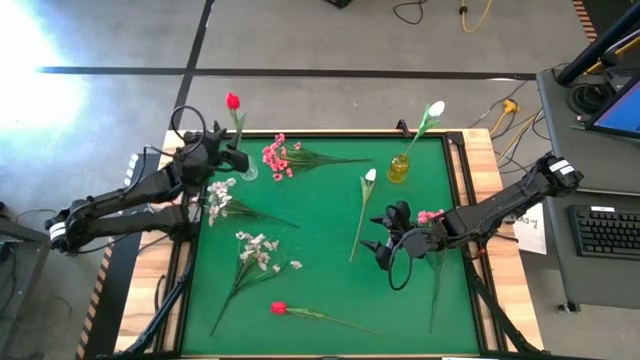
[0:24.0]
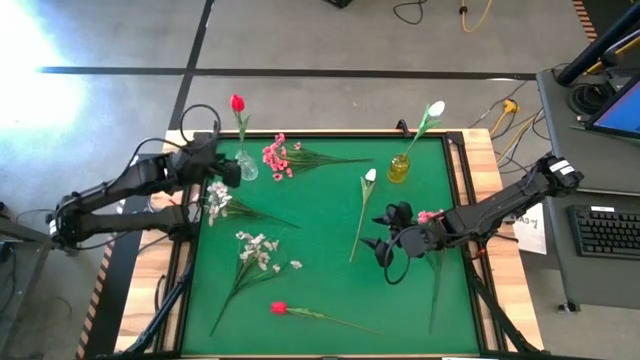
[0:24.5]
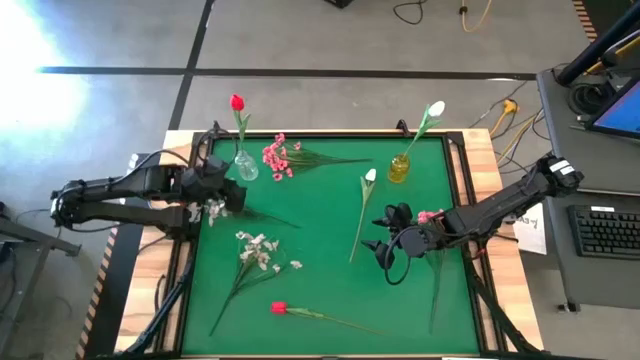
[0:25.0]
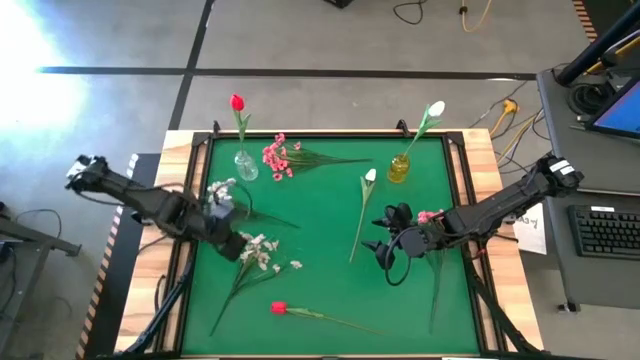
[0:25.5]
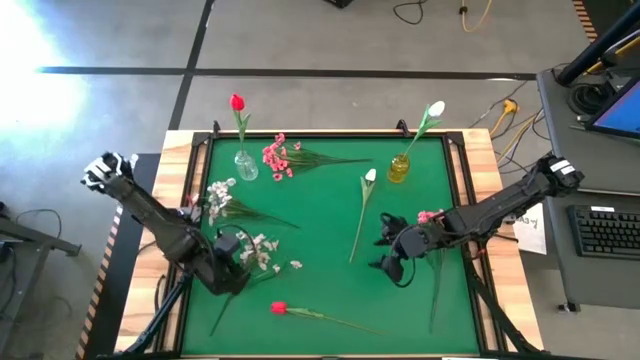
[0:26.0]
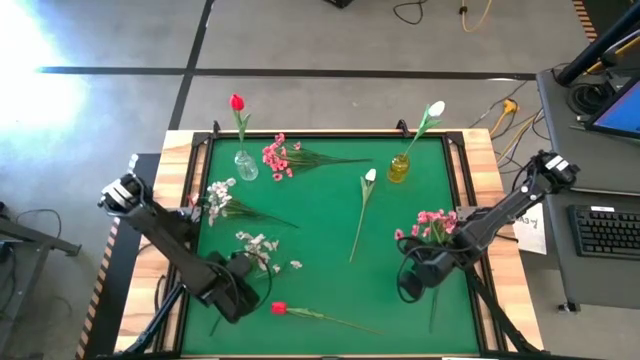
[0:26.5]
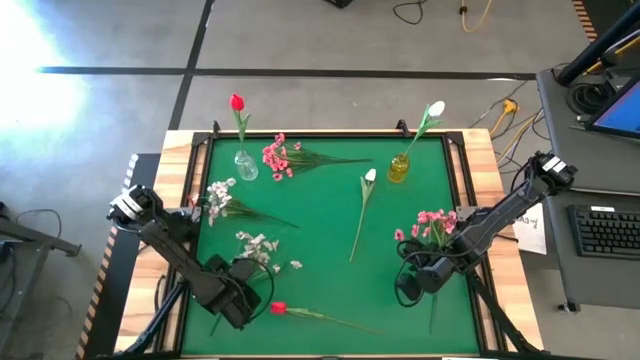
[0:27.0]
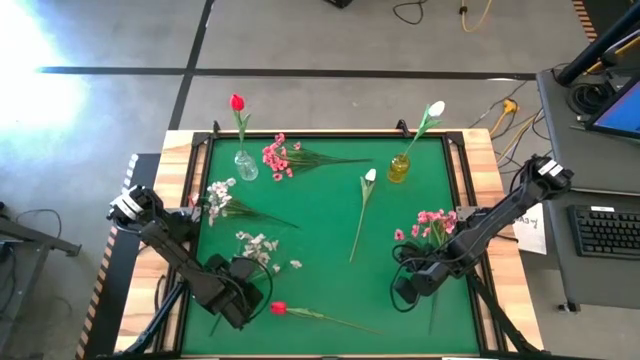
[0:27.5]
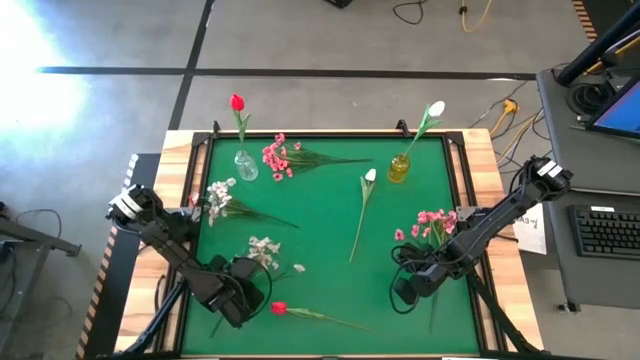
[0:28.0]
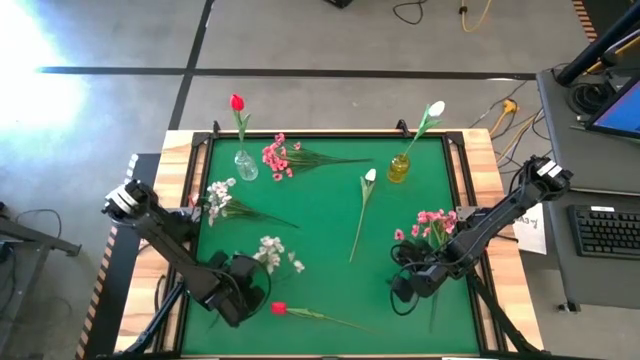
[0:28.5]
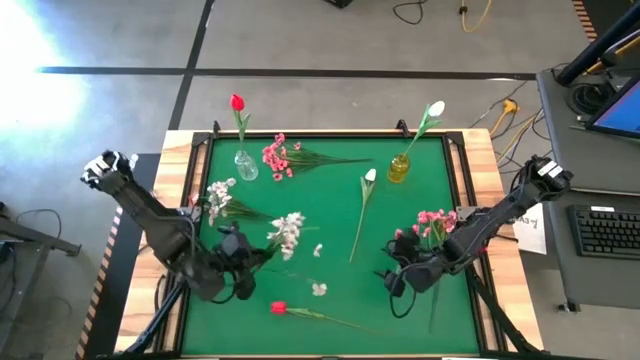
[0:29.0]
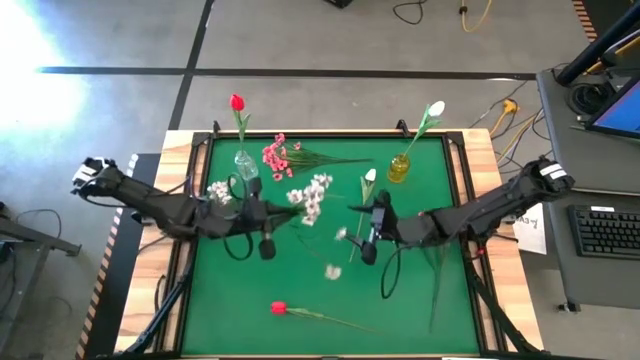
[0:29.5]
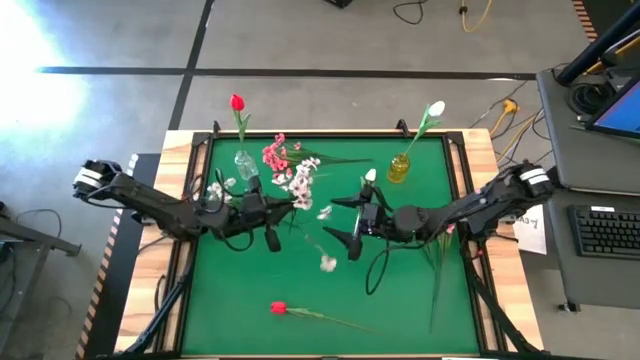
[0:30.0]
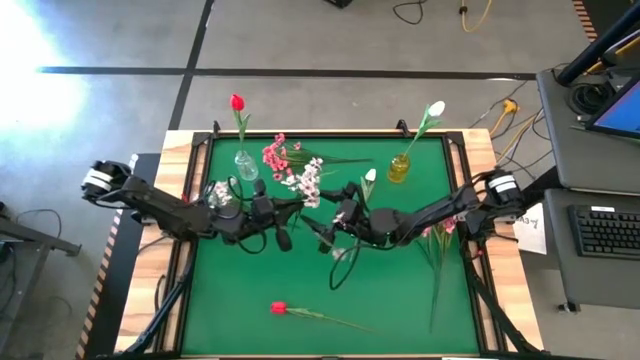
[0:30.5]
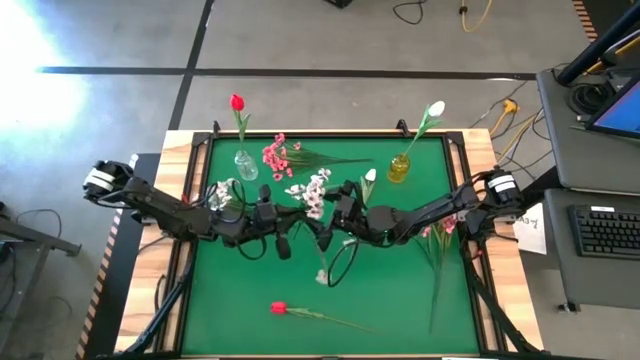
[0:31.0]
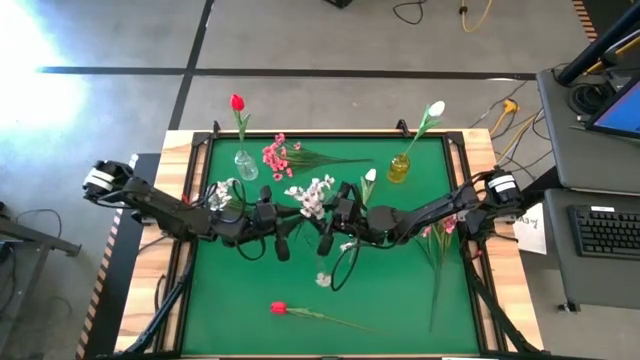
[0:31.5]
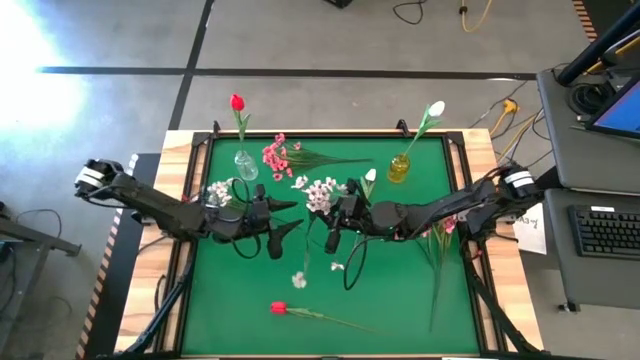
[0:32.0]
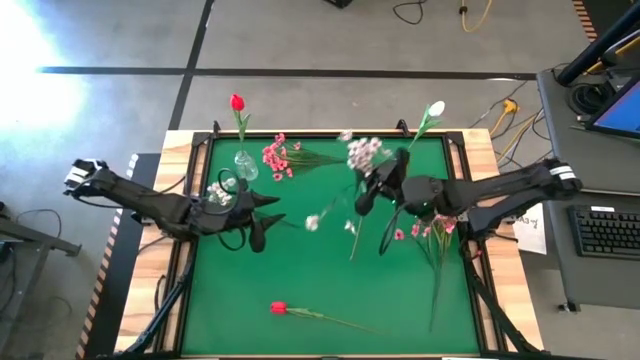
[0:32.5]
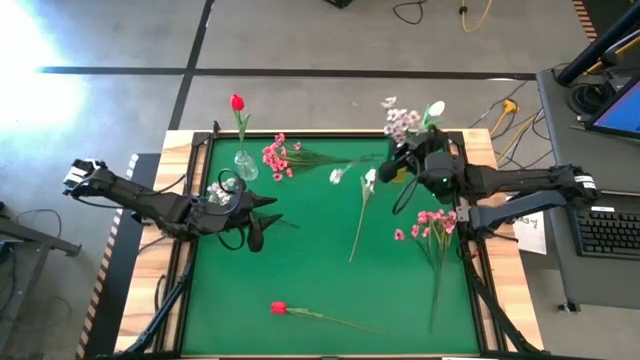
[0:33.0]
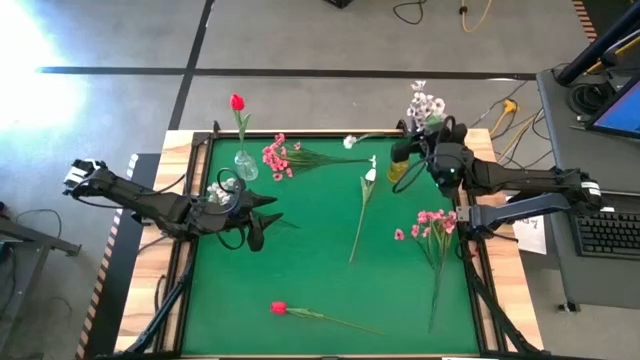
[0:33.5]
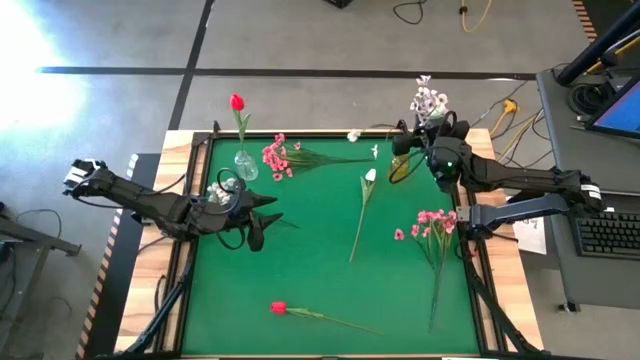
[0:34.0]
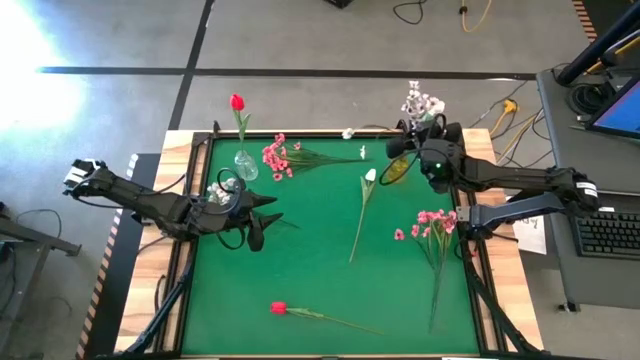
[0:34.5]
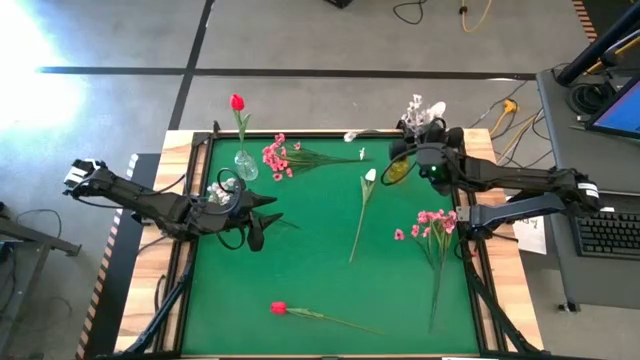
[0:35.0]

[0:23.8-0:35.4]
Task: Sort flowers into vase by color
Put the bottom white flowers into the yellow vase

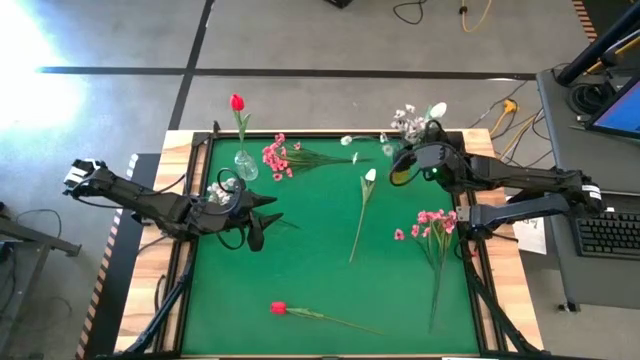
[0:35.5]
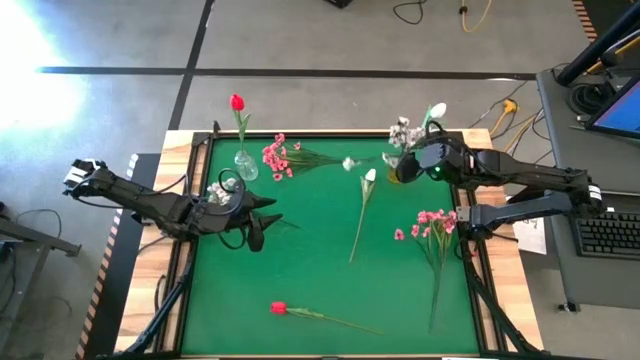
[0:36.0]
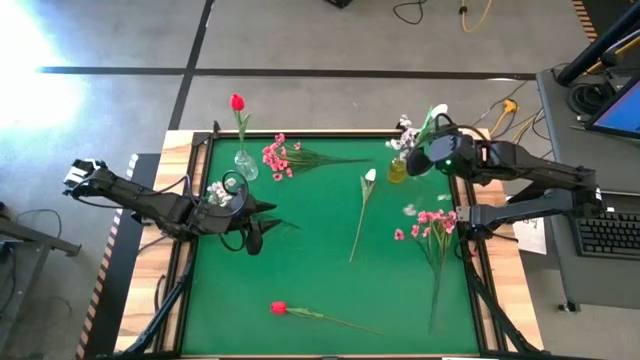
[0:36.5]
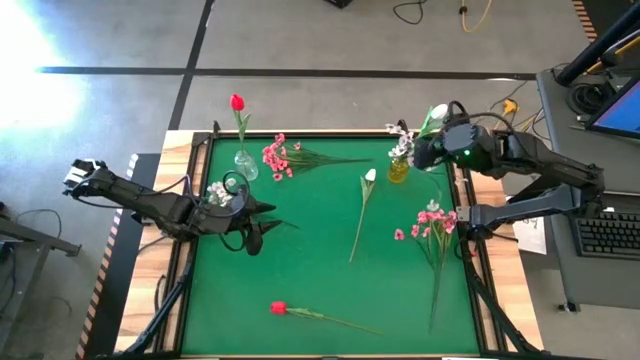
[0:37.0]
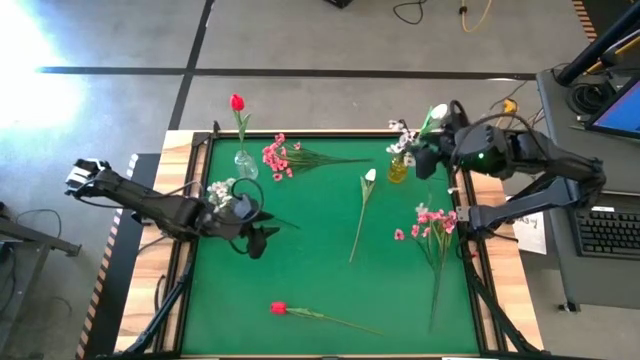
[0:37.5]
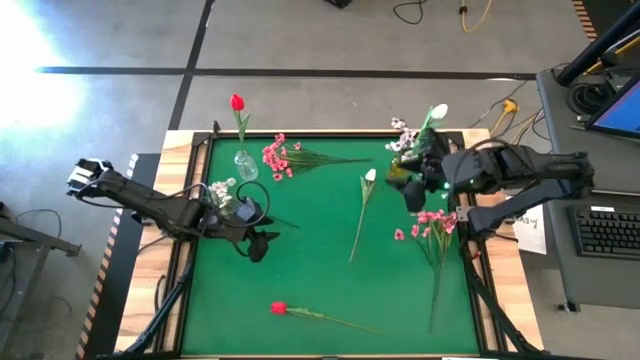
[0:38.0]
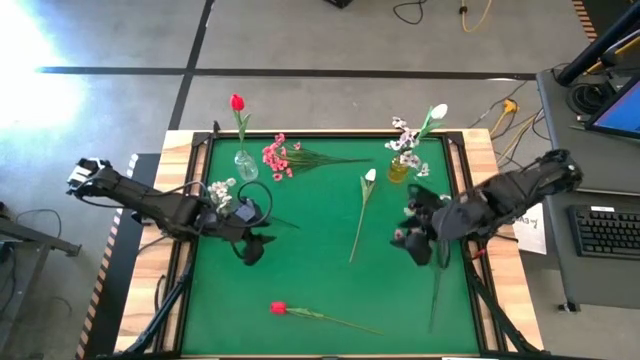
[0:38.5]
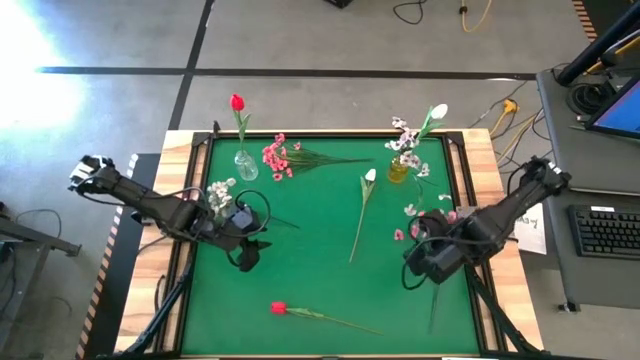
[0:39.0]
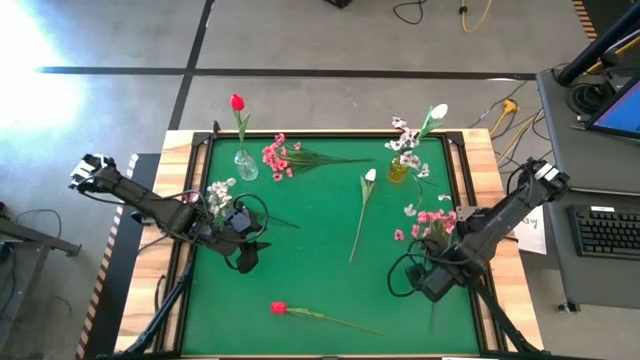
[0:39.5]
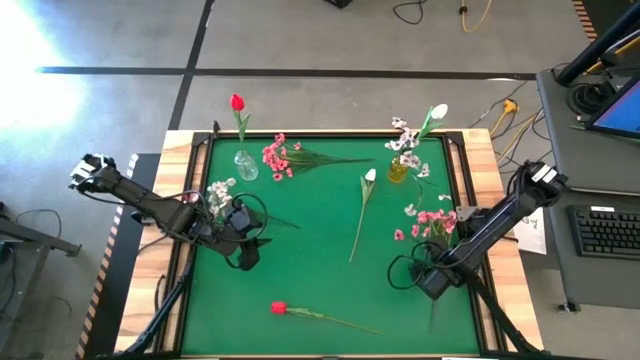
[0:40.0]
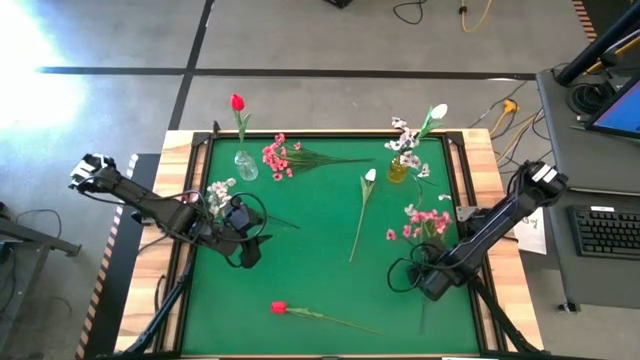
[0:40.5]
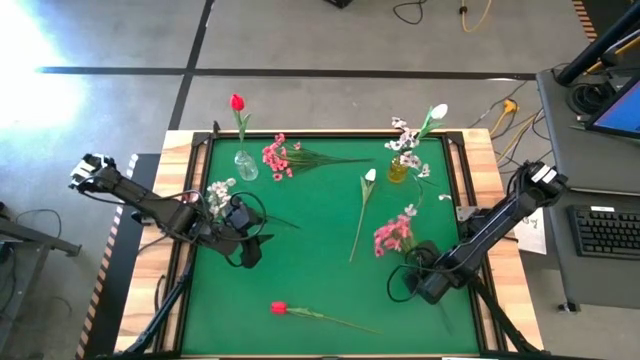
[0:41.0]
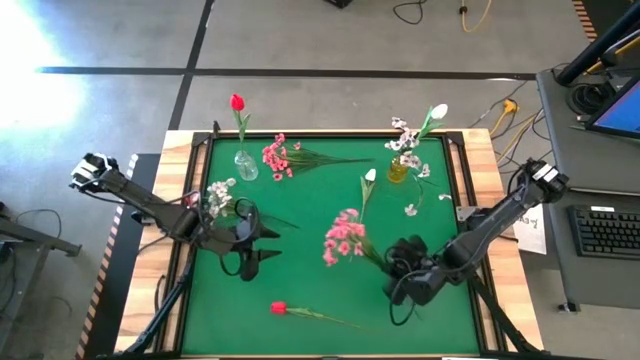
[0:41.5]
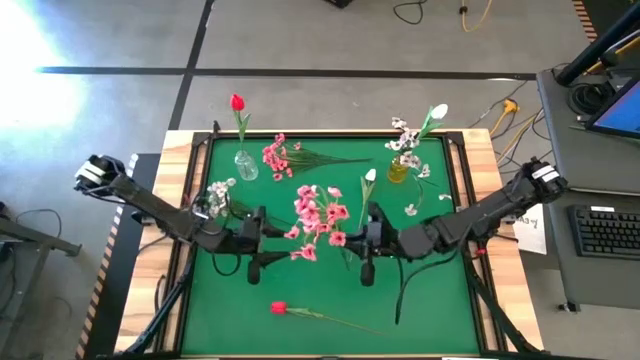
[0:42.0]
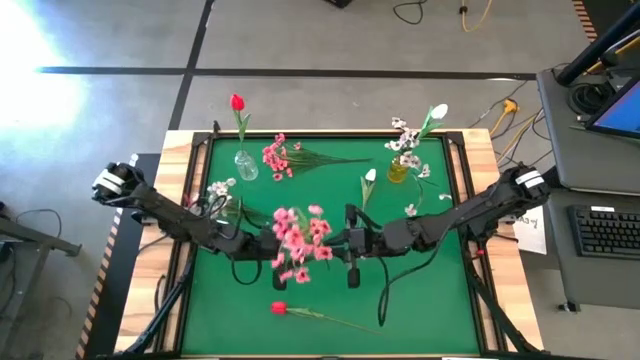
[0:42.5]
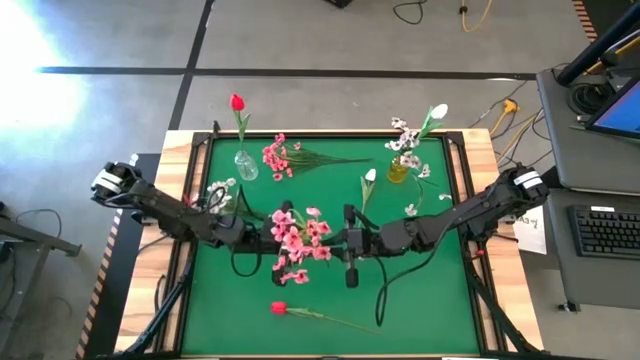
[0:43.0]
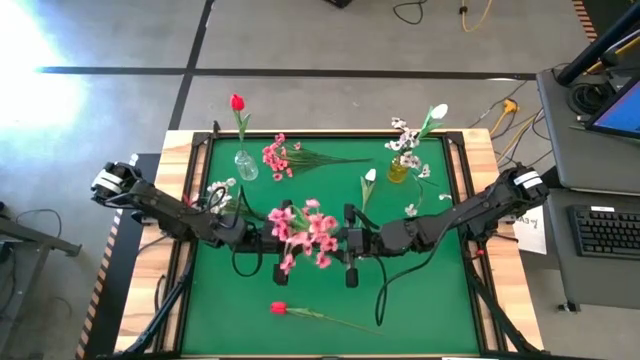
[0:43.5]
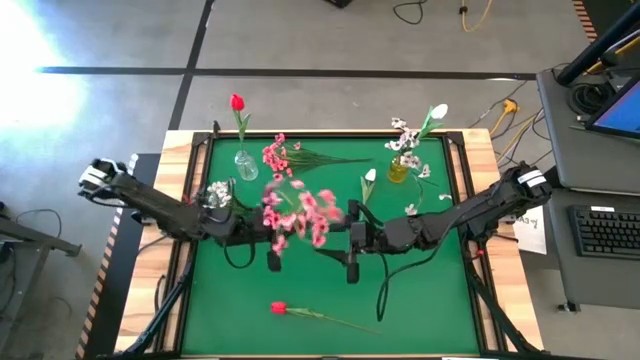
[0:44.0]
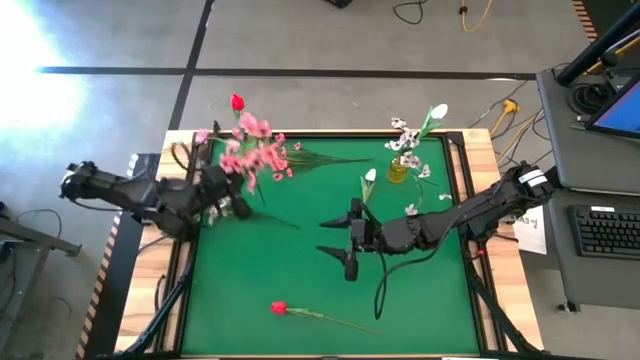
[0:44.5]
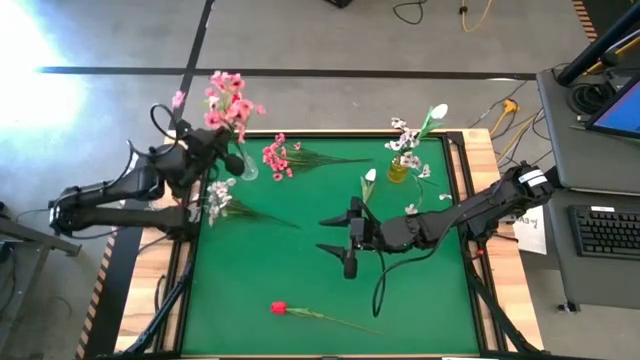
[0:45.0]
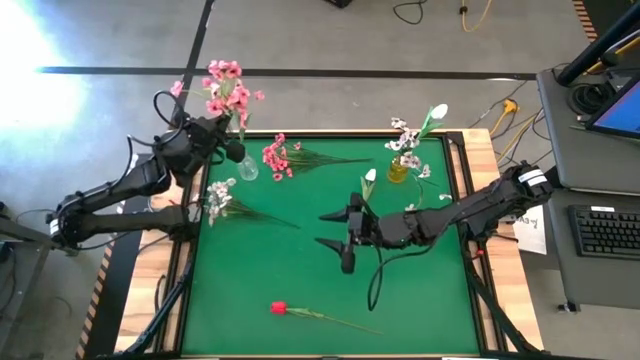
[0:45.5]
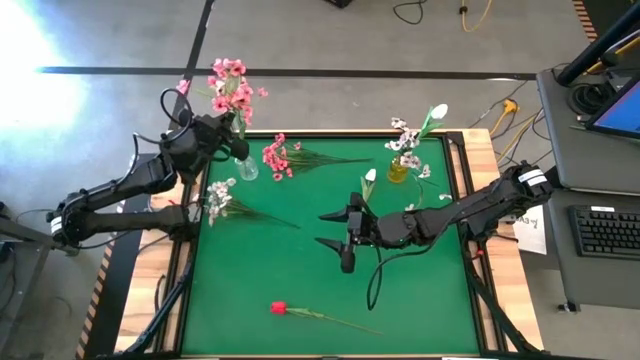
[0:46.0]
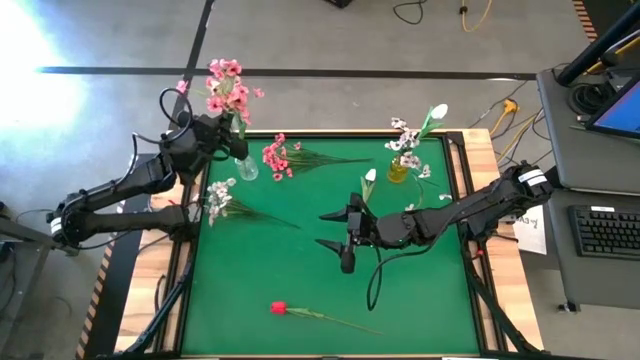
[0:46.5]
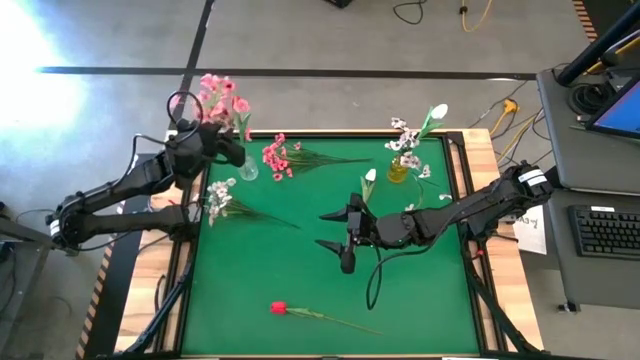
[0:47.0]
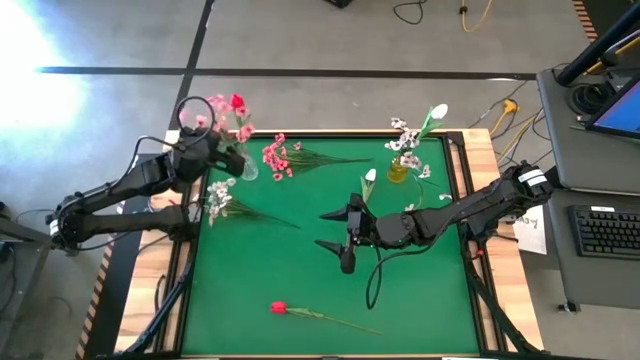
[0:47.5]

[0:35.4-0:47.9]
Put the right pink flowers into the transparent vase
